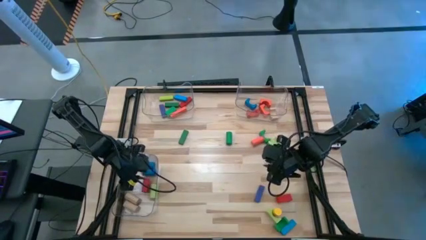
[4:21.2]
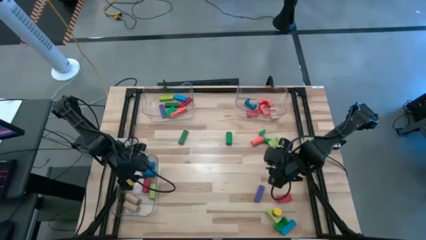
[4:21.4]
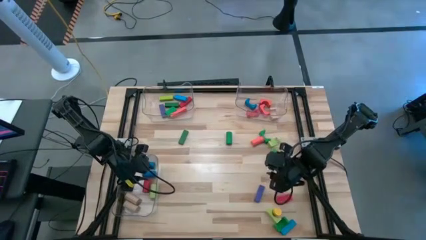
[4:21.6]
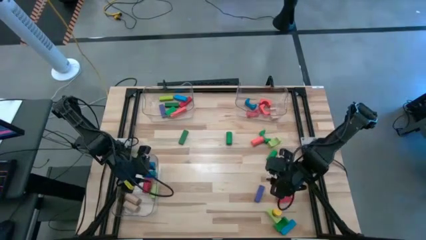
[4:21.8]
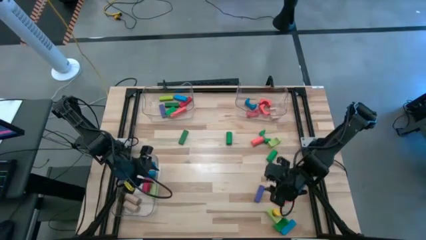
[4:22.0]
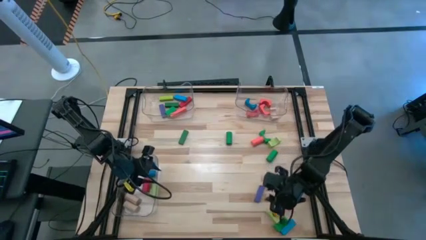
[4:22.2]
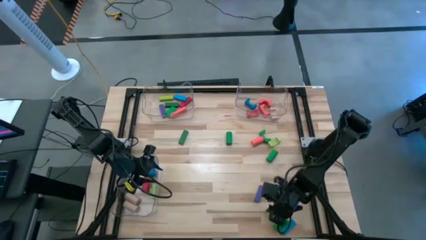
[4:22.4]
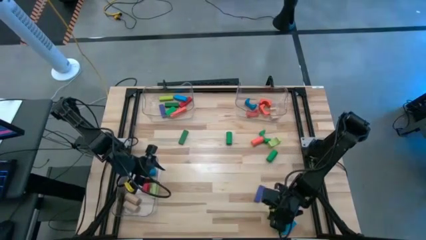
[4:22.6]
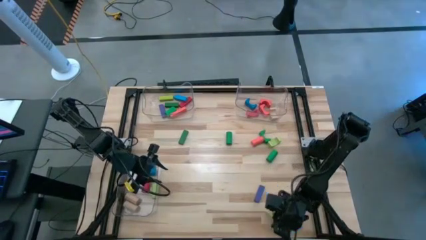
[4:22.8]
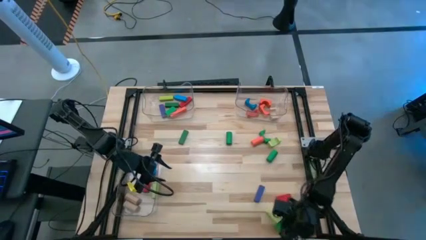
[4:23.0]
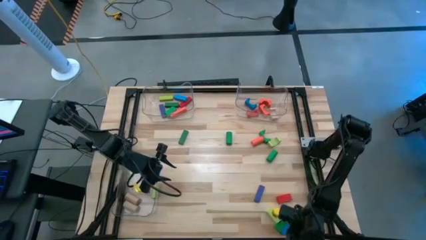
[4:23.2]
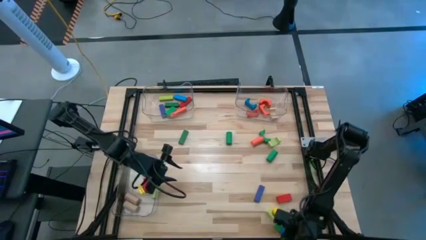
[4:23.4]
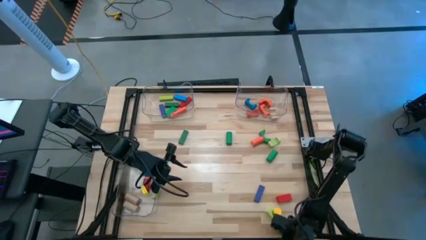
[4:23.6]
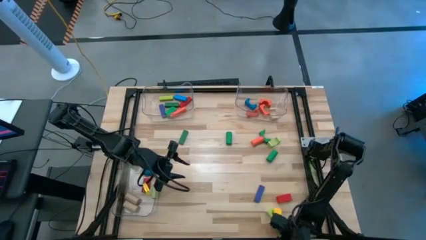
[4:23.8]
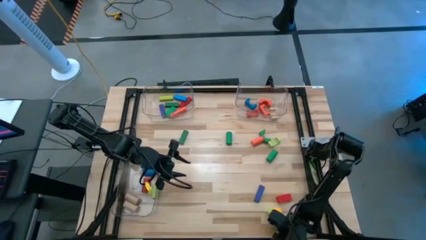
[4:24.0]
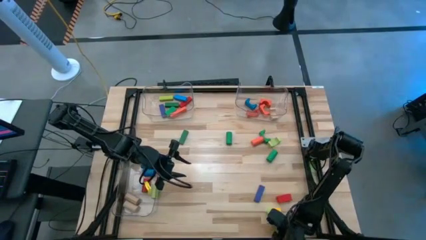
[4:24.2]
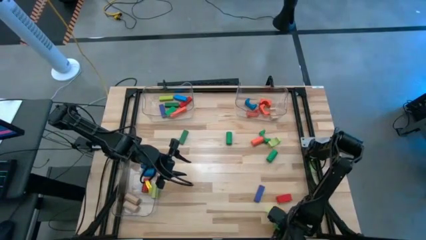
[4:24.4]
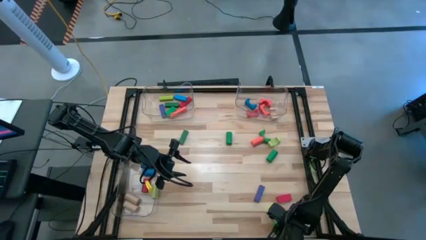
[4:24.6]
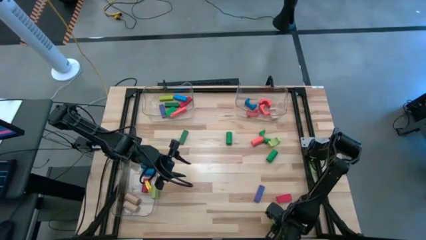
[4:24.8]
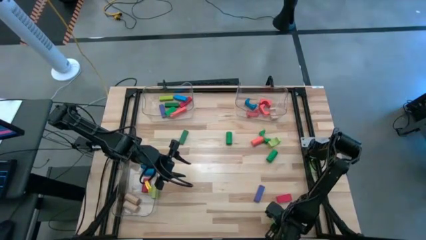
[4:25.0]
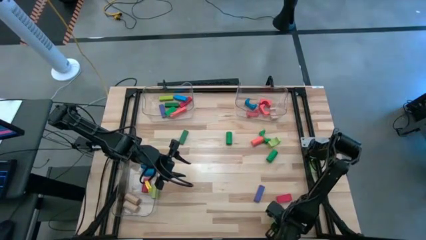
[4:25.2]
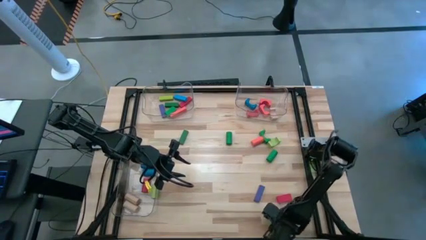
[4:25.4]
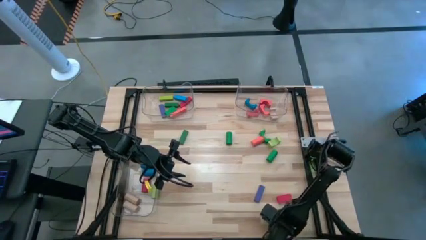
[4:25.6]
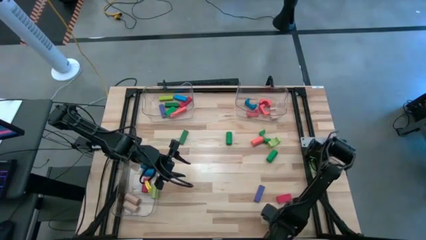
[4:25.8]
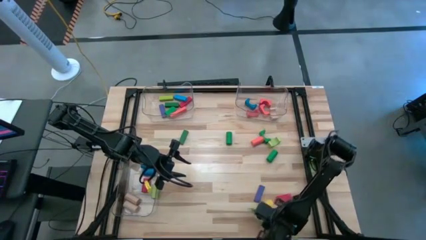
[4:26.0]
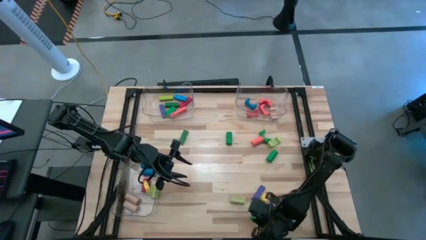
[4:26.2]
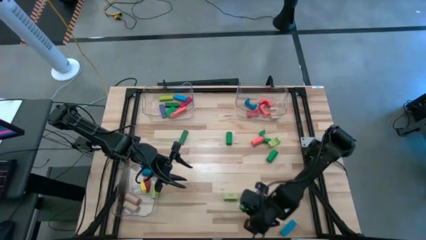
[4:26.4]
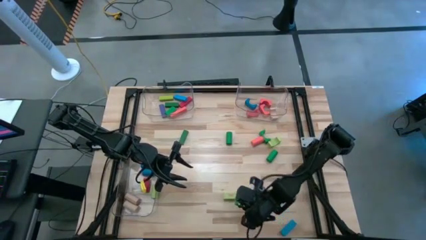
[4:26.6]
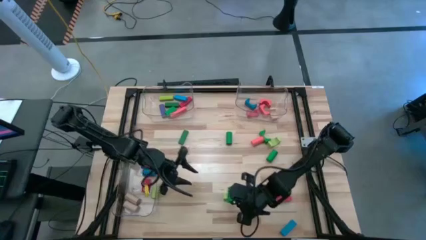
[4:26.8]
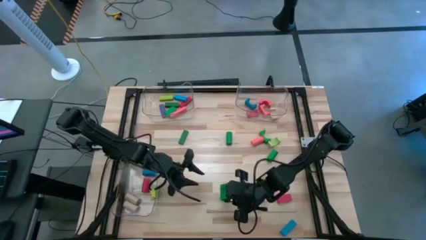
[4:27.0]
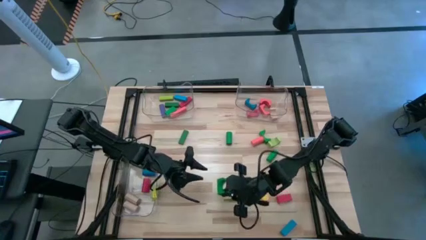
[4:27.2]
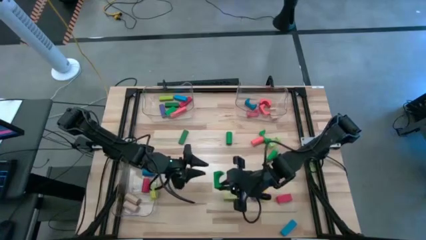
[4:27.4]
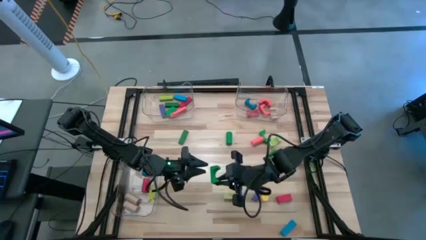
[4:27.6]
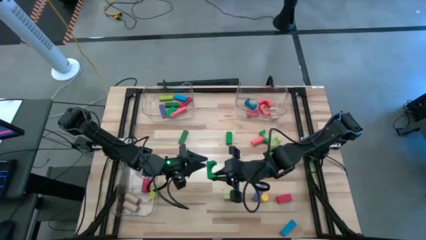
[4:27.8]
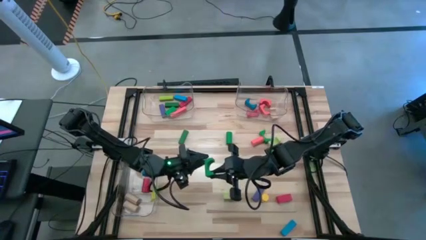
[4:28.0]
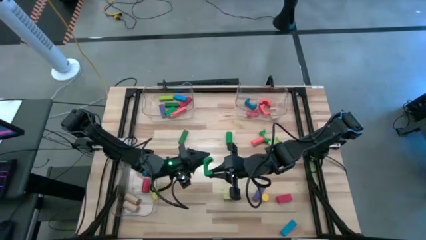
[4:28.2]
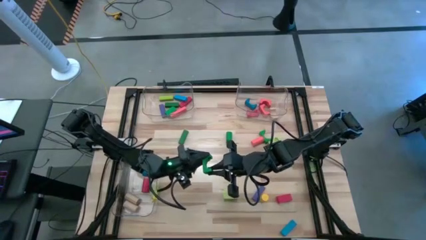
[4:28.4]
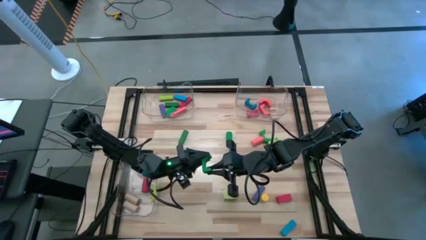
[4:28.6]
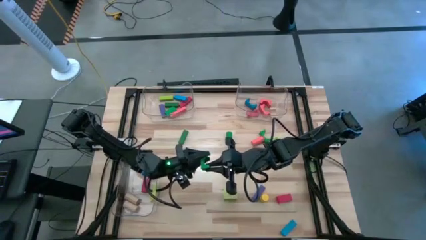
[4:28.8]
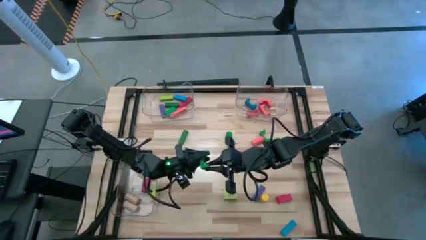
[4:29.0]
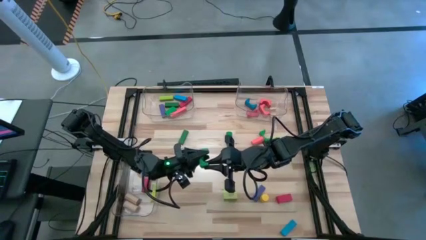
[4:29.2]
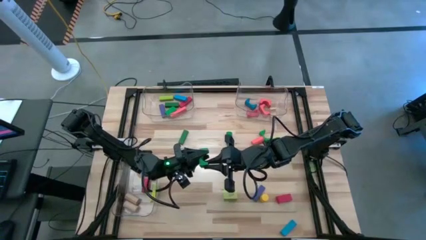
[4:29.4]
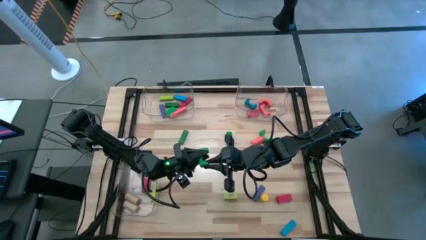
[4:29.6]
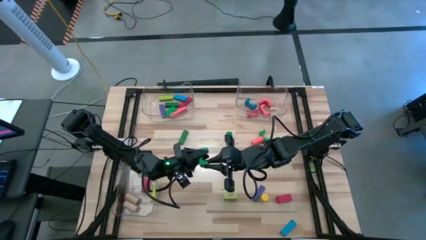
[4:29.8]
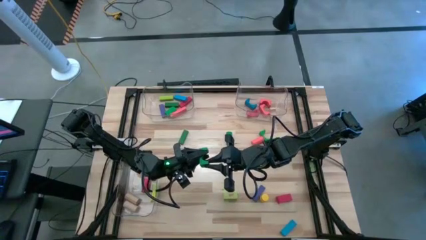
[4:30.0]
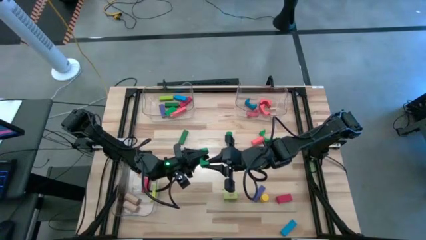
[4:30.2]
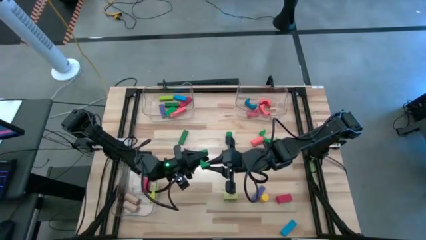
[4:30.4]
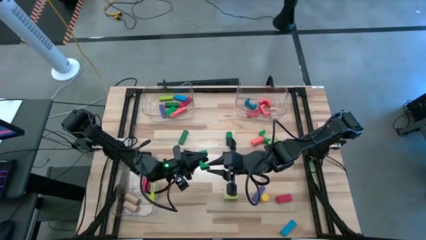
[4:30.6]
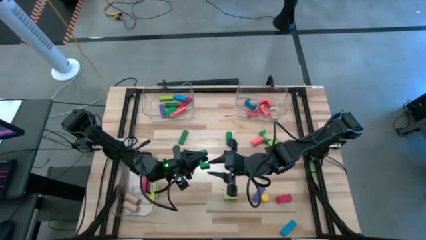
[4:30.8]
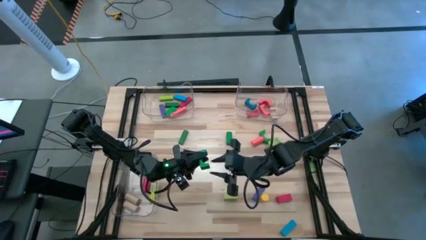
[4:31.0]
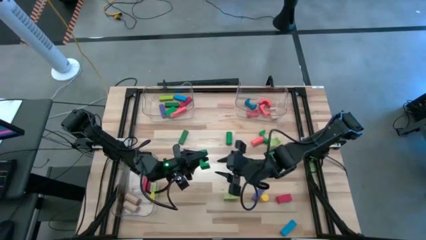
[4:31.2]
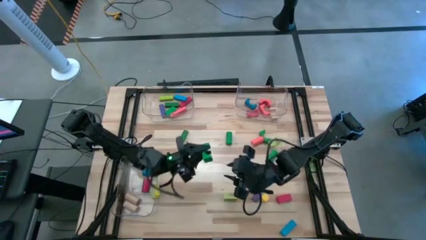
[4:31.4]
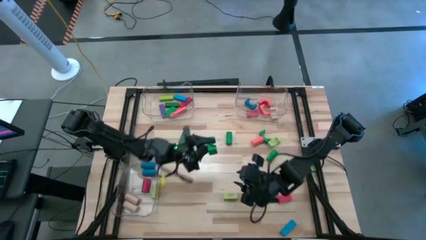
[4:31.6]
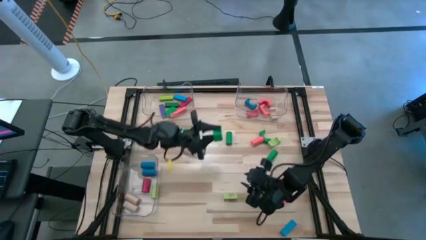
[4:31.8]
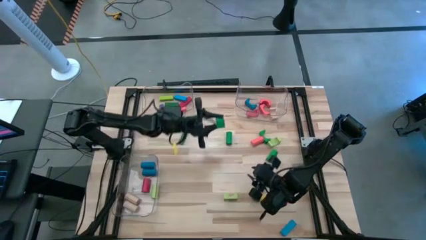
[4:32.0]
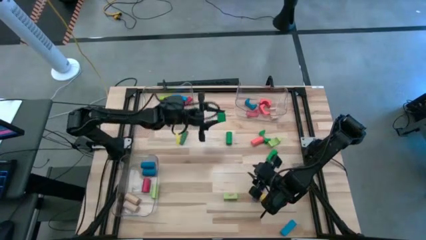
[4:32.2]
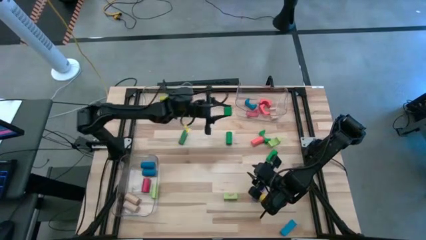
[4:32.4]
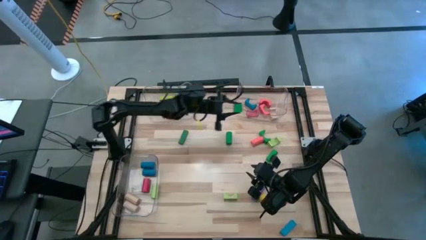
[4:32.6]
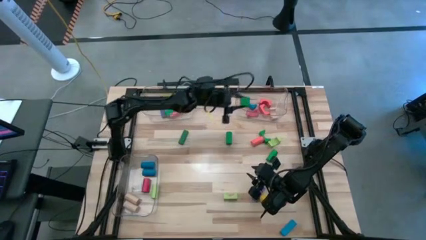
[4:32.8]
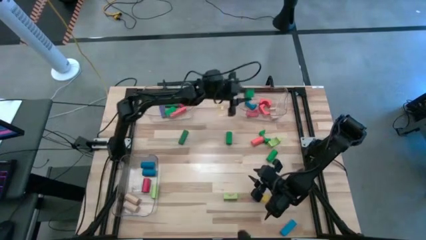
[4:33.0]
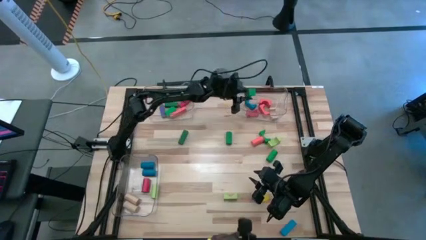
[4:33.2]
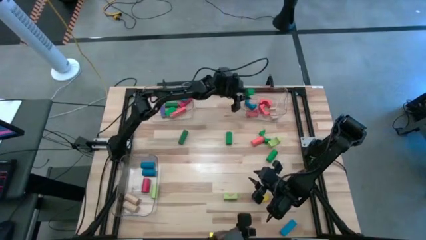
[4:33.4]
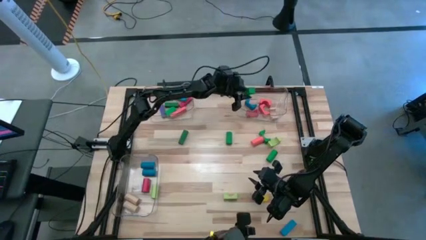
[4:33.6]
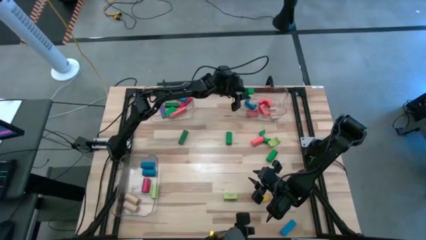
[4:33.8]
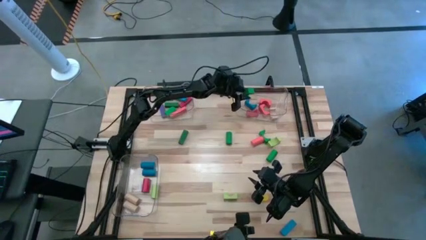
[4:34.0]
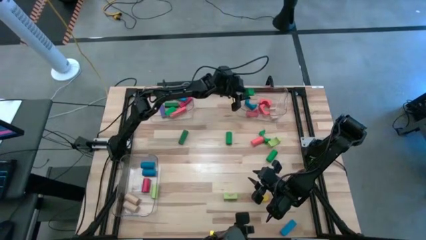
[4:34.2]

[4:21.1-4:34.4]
Task: Sort blocks by size
Put the green arch block into the top right transparent bin

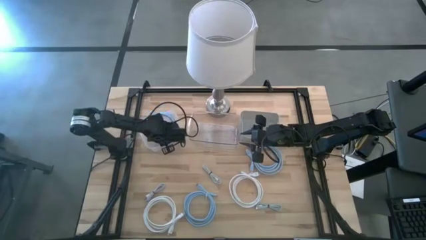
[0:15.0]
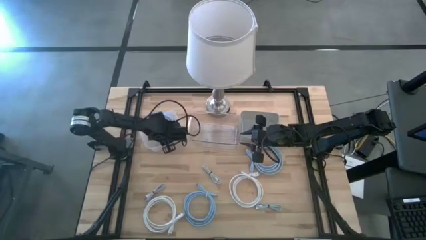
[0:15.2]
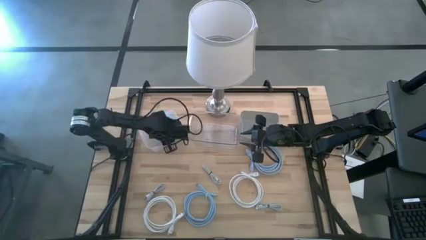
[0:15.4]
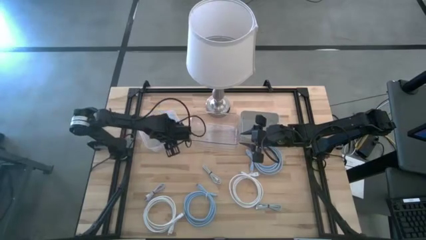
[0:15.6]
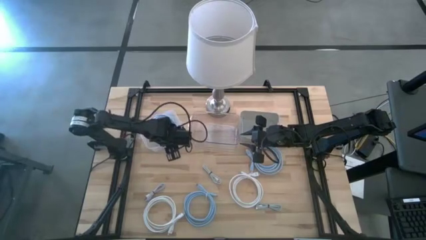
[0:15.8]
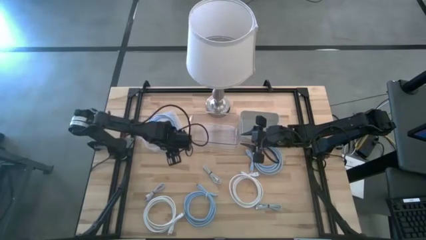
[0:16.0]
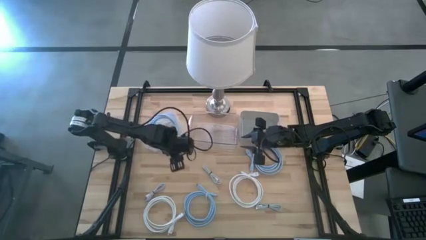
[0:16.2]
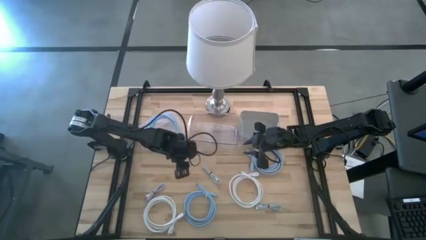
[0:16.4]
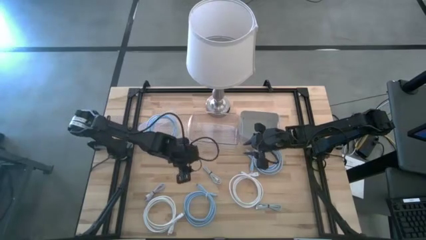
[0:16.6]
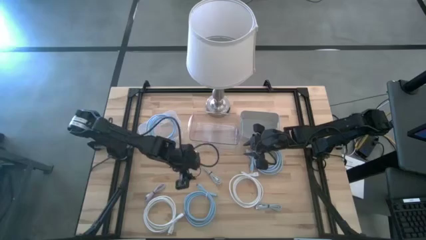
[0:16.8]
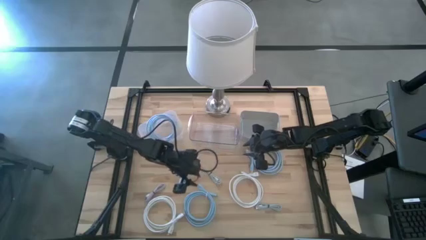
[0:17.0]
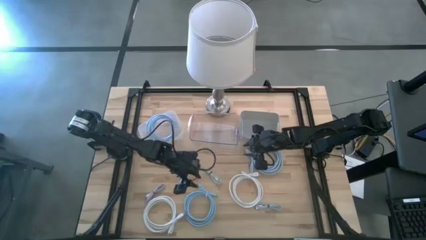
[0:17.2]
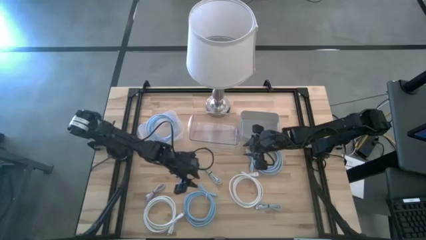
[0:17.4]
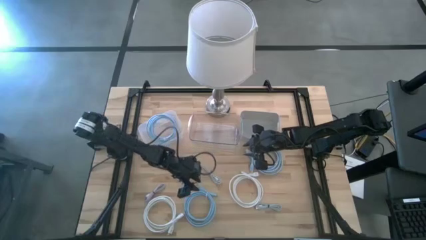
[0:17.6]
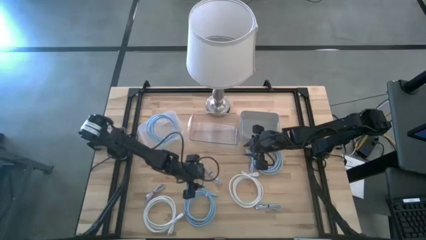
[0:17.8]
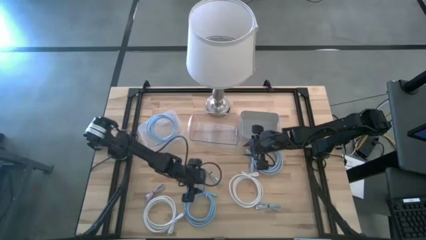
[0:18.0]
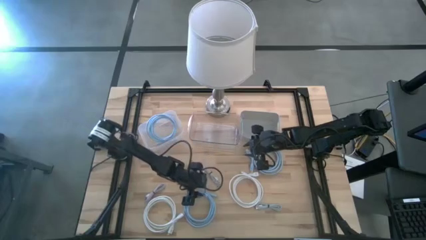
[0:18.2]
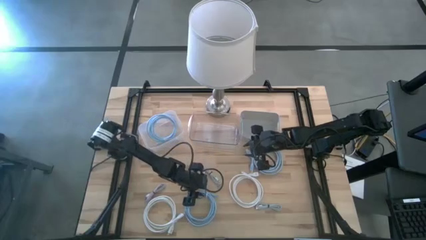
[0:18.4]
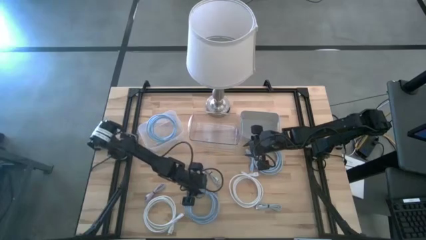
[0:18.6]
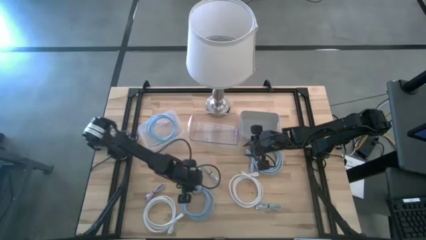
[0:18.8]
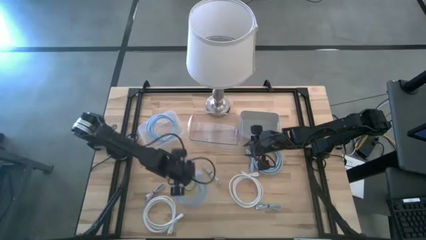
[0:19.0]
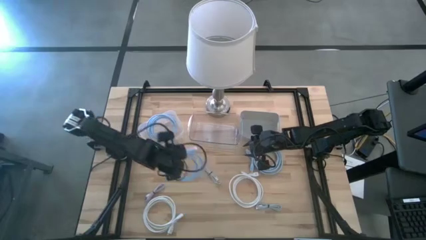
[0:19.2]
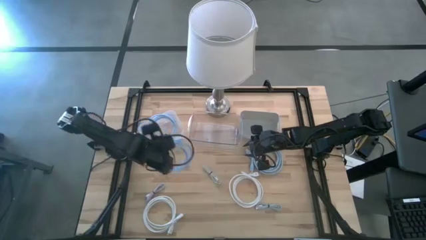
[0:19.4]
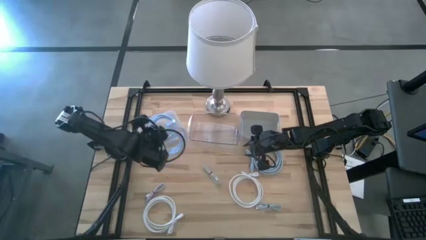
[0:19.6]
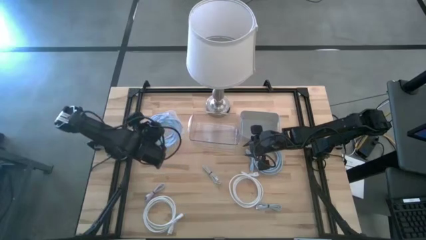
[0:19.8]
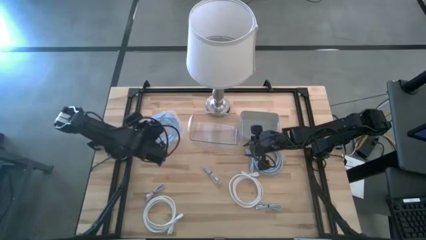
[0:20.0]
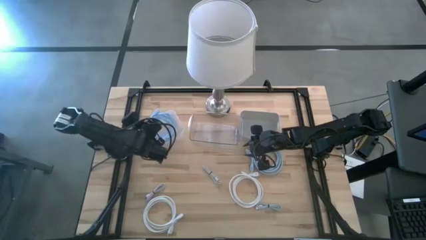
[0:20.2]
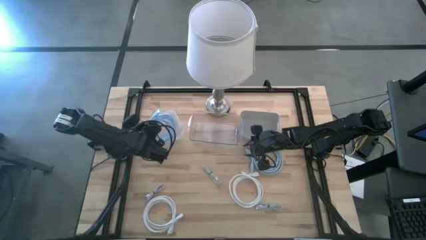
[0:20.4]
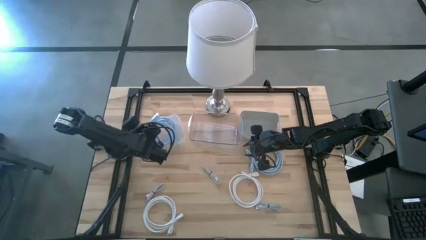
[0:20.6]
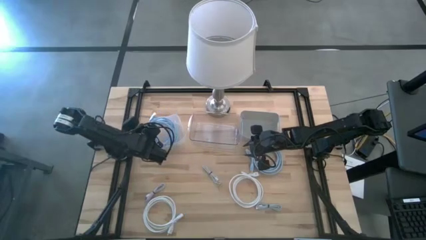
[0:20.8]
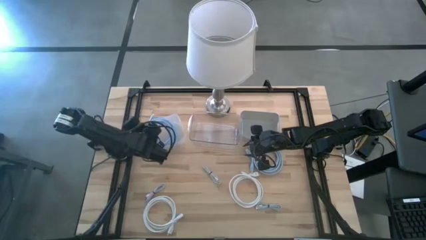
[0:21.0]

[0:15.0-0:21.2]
Task: Pick & Place USB Port
Put the bottom blue hdmi cable into the white bin
